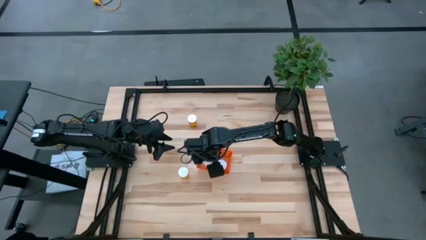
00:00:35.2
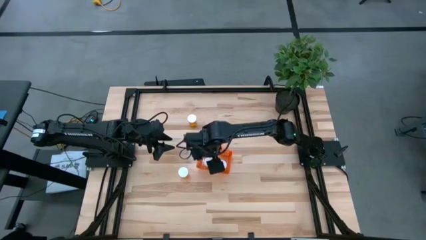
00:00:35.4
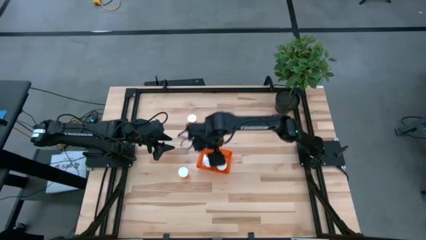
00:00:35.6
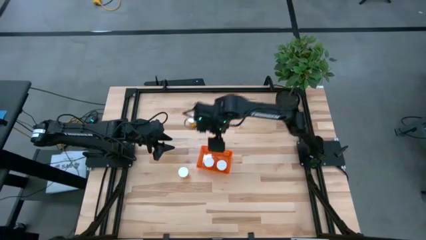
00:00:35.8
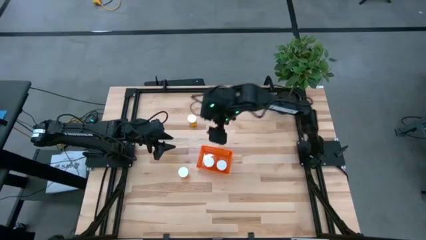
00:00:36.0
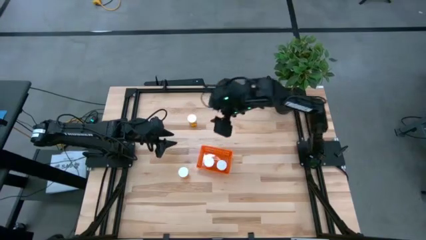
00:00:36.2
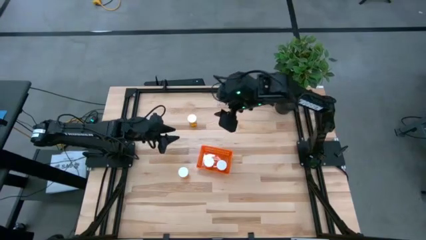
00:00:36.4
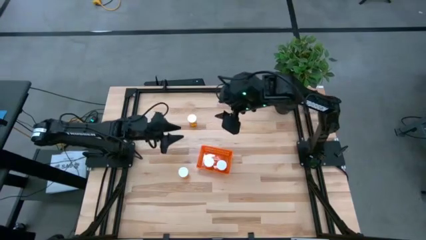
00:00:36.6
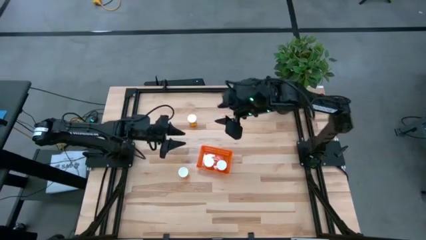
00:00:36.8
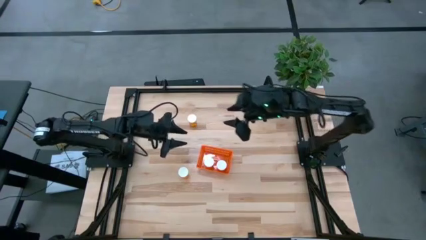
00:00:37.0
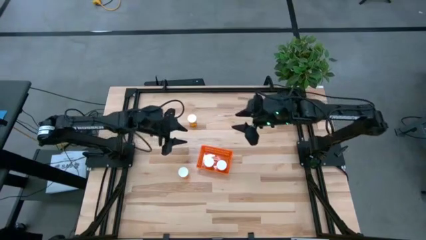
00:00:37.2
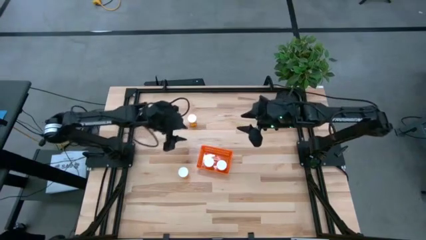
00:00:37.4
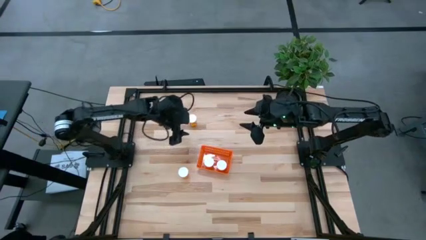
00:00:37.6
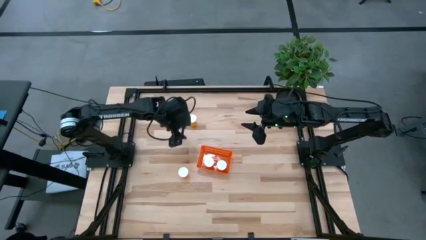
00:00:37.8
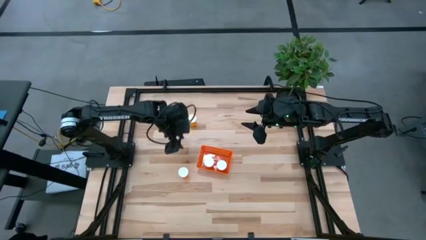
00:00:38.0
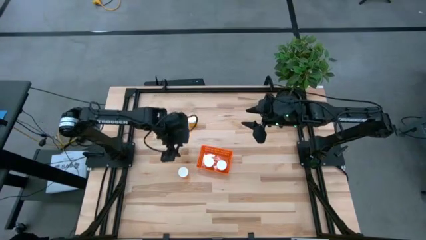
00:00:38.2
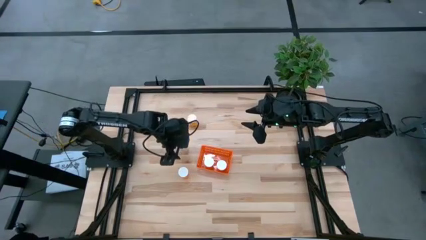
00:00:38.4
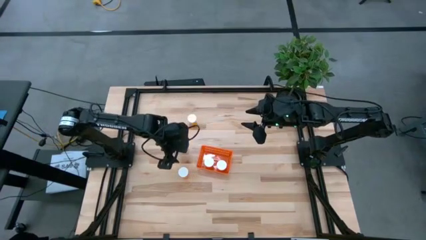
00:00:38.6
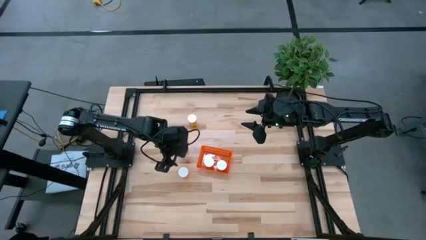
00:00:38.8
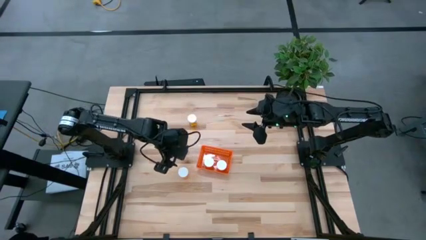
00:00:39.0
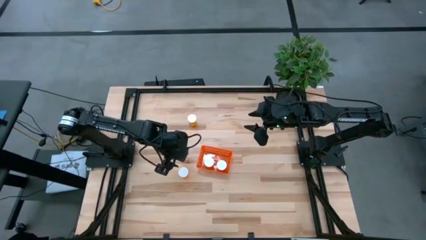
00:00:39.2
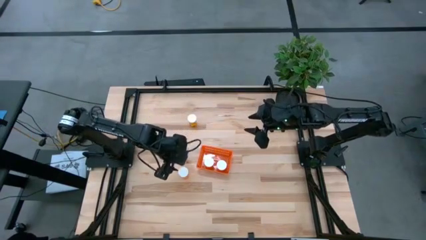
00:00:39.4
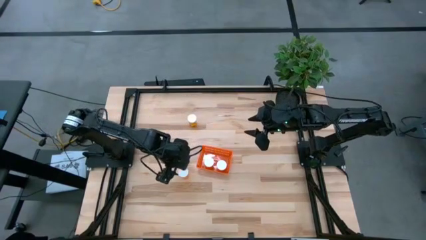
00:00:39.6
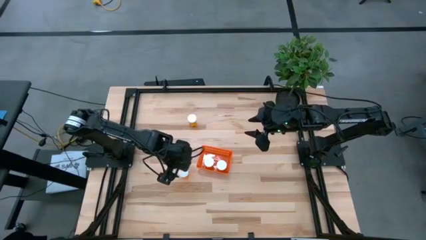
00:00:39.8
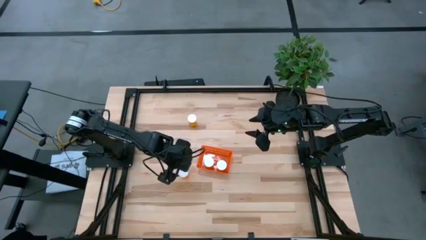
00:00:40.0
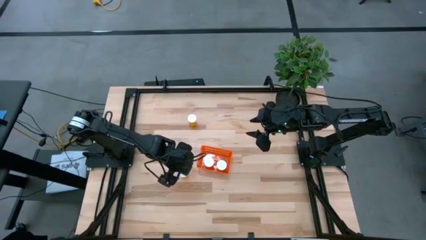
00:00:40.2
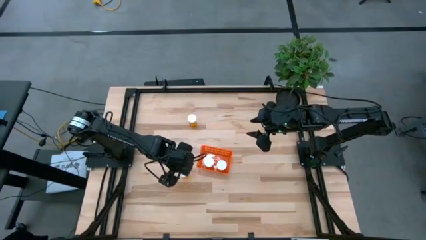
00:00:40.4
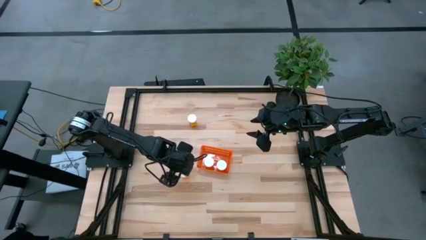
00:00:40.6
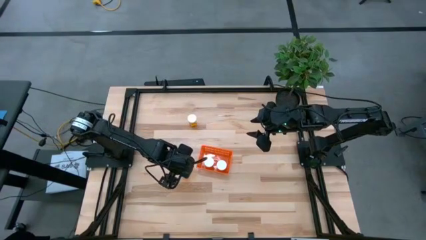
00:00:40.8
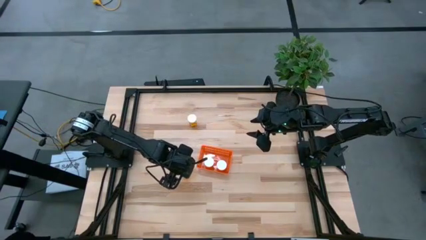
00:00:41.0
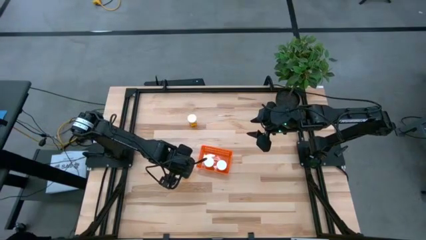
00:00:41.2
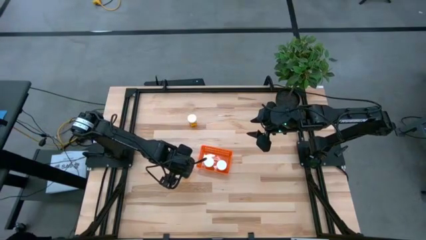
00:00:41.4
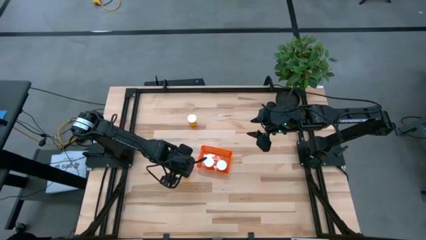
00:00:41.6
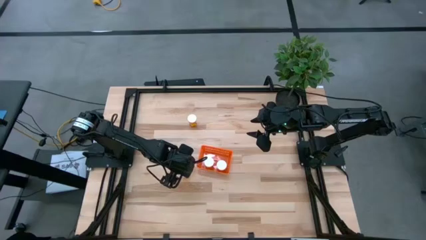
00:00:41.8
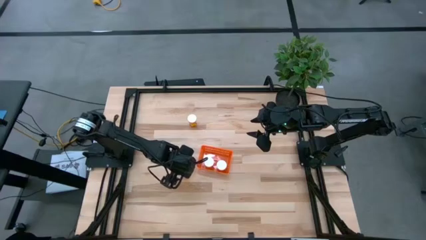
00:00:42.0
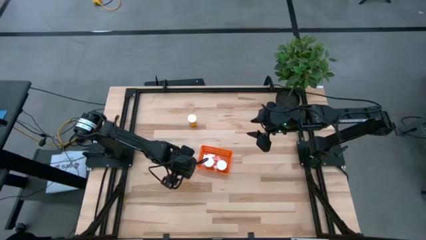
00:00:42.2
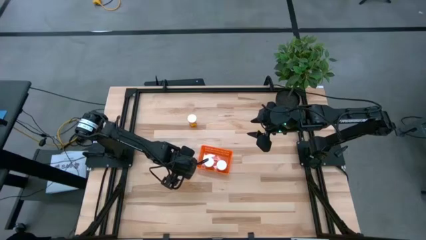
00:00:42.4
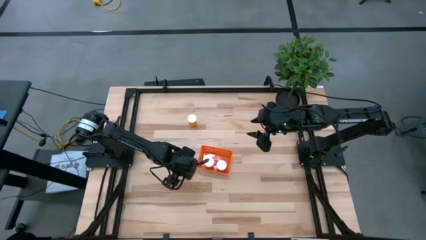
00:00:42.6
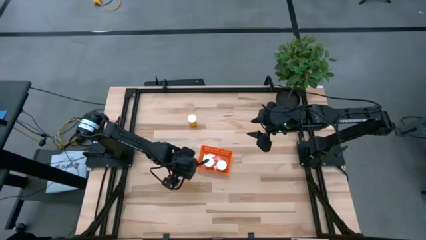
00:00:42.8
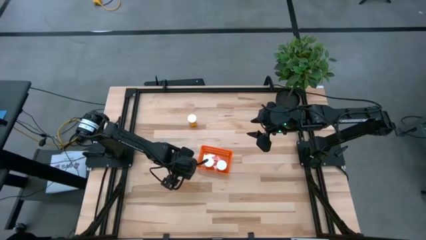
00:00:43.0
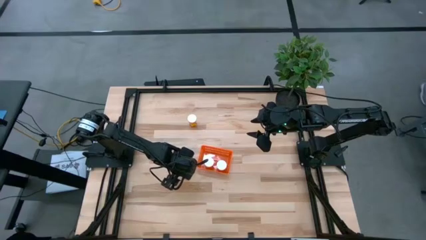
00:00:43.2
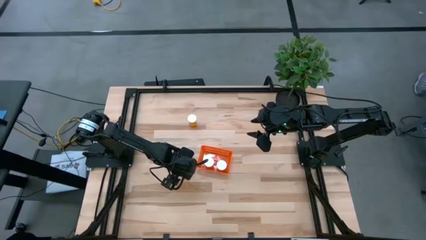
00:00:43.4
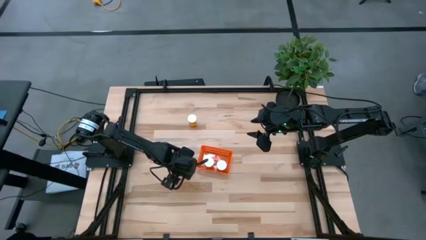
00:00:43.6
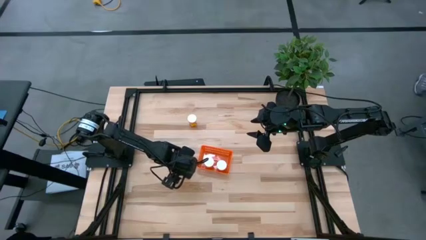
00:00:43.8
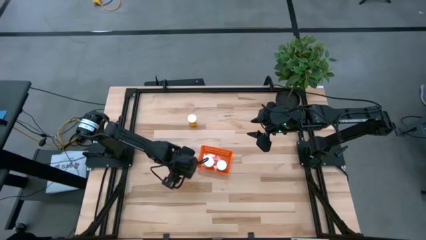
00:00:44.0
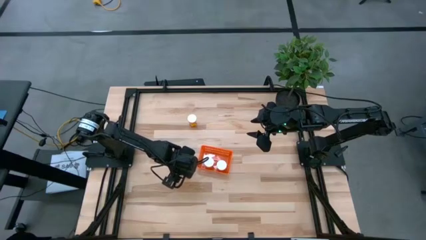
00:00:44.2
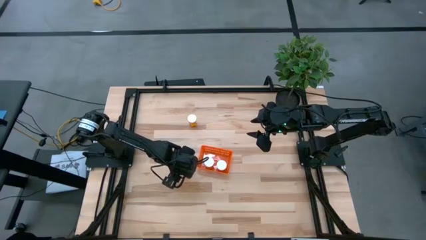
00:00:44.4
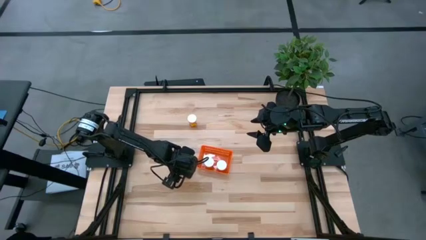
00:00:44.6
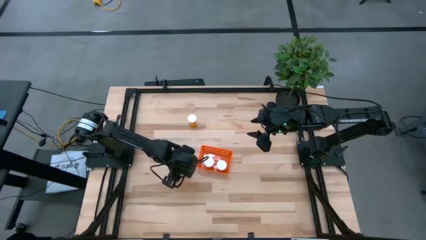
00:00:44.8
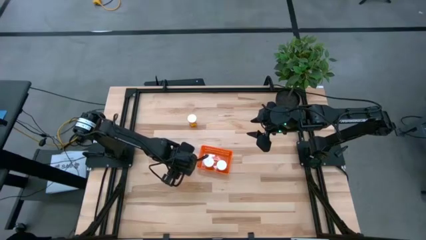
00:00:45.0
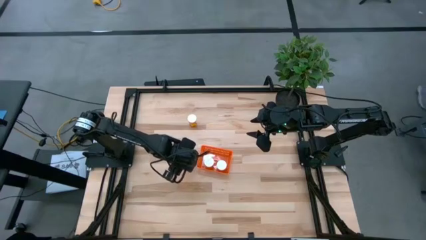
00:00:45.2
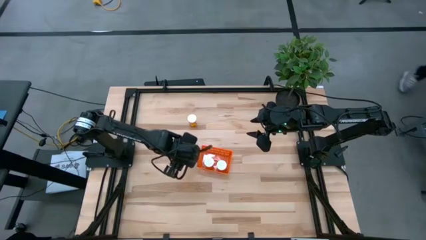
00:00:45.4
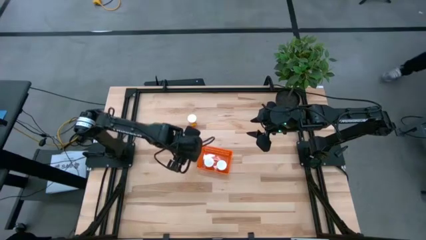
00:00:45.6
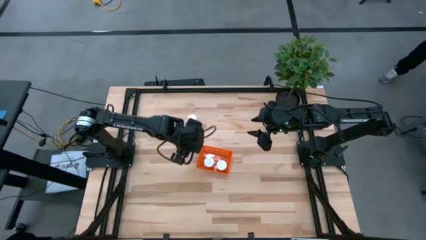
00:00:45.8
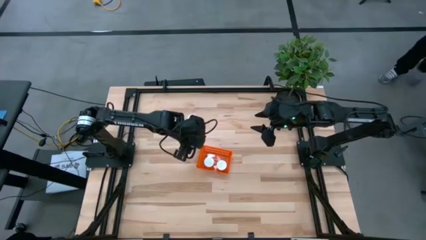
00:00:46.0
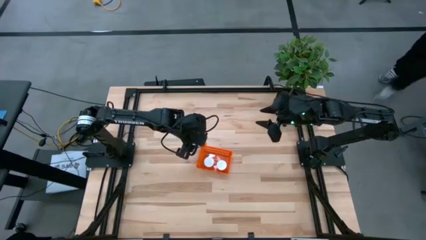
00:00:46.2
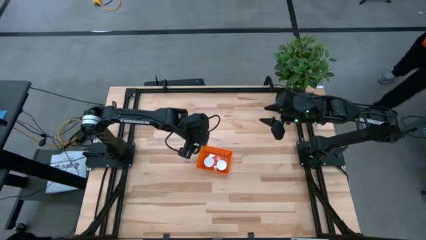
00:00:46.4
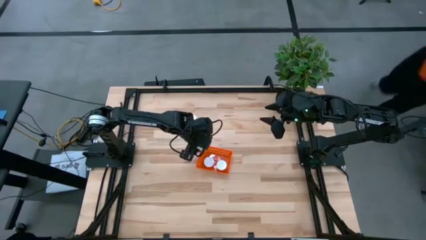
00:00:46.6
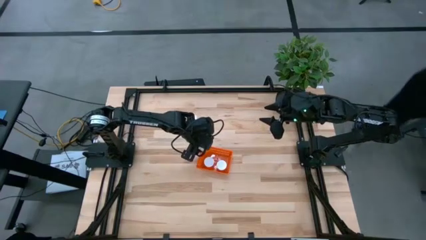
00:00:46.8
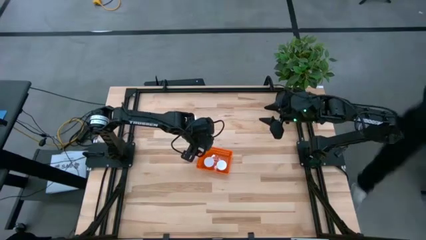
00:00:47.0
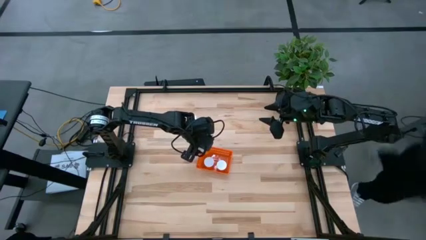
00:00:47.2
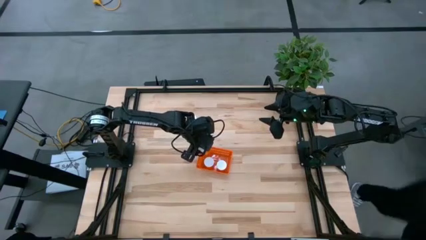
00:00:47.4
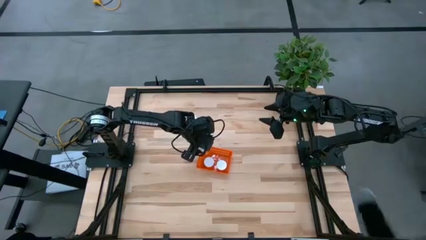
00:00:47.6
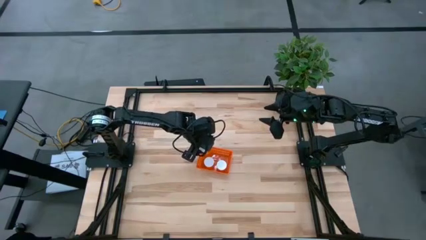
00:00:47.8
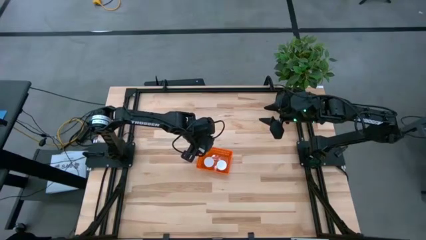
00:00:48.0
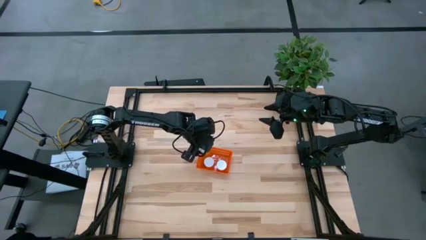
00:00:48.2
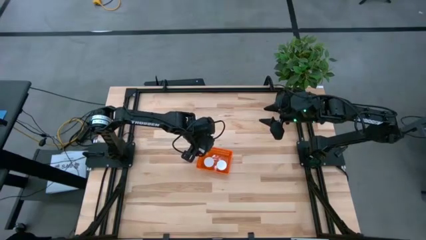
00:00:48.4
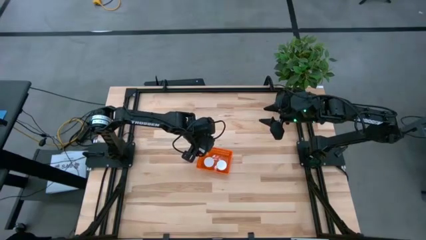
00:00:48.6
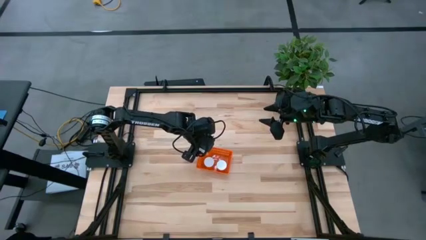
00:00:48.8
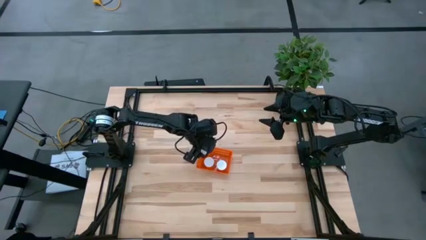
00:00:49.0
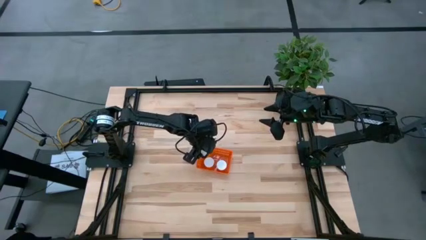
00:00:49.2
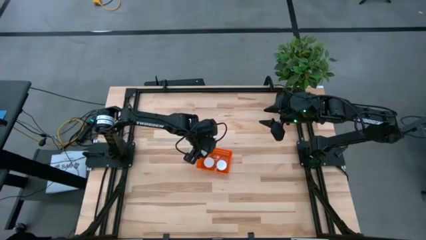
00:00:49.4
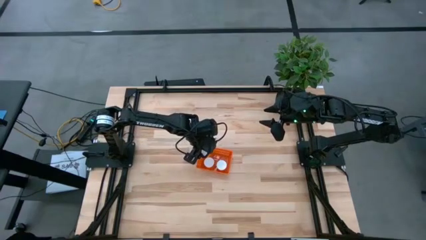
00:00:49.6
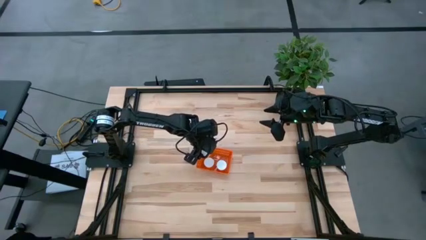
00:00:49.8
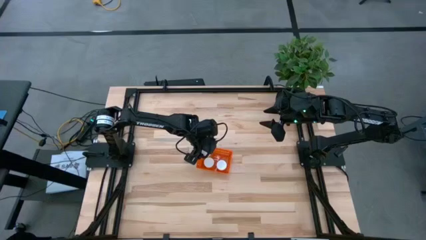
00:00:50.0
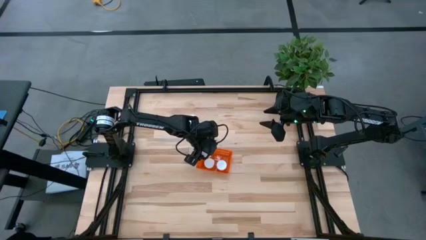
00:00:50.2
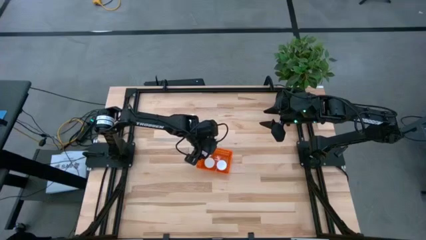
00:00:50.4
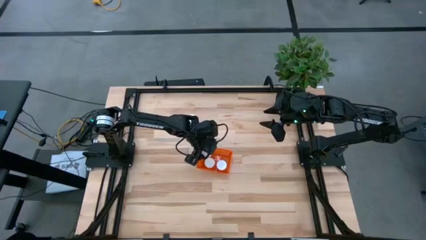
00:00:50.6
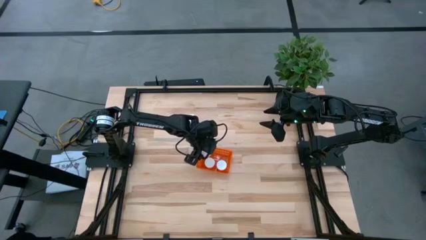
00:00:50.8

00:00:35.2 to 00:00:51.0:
Task: Pick and place pill bottles into a basket
Put the bottom orange pill bottle into the orange bin
